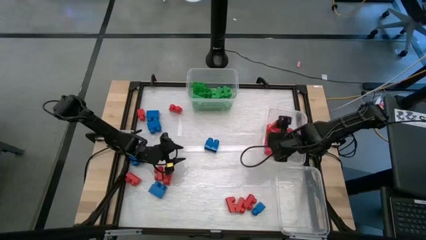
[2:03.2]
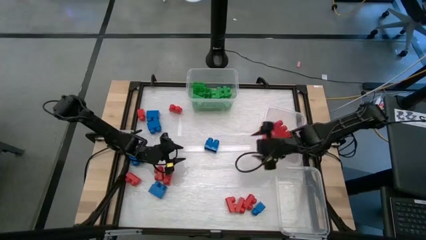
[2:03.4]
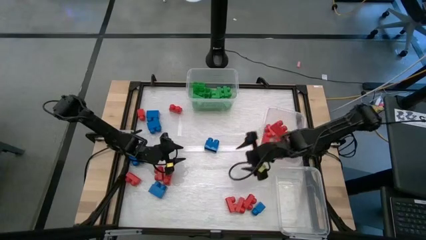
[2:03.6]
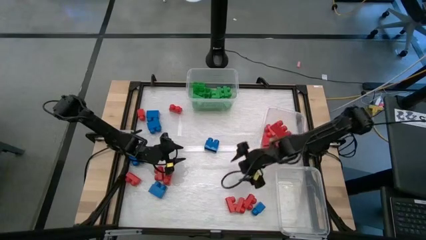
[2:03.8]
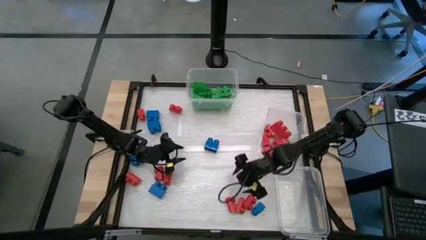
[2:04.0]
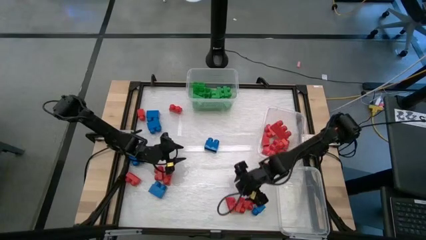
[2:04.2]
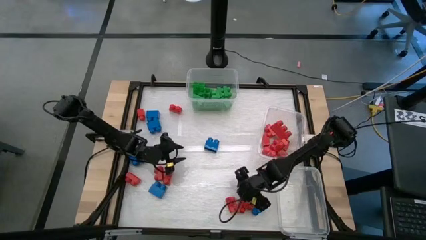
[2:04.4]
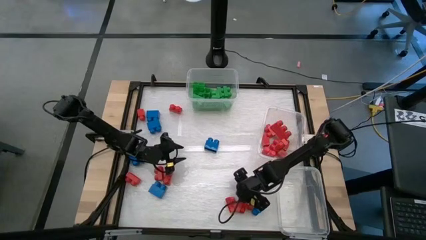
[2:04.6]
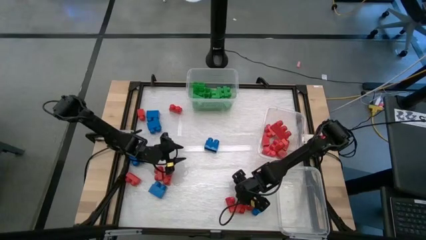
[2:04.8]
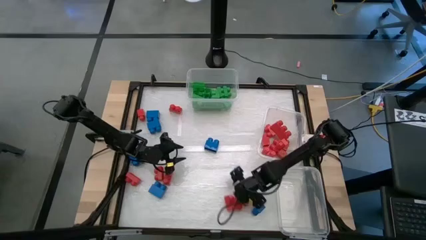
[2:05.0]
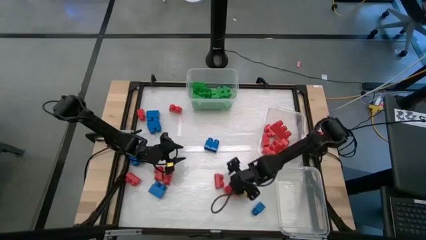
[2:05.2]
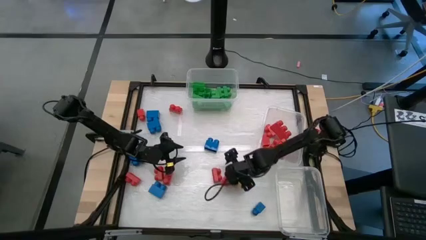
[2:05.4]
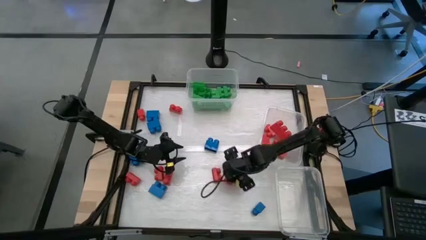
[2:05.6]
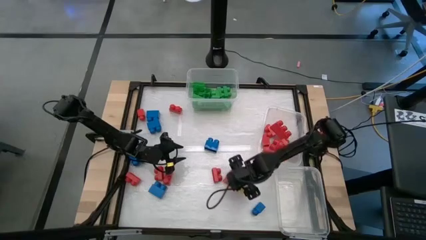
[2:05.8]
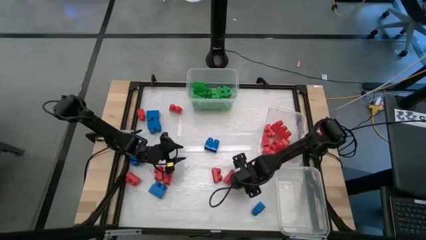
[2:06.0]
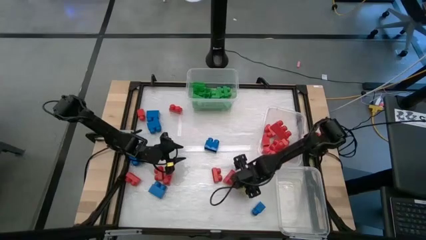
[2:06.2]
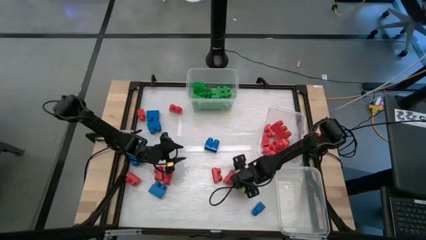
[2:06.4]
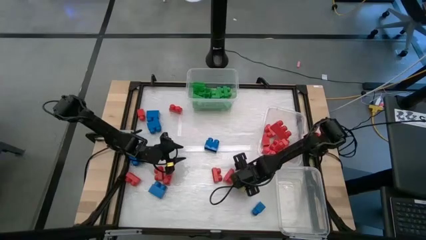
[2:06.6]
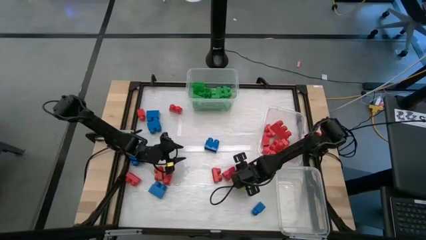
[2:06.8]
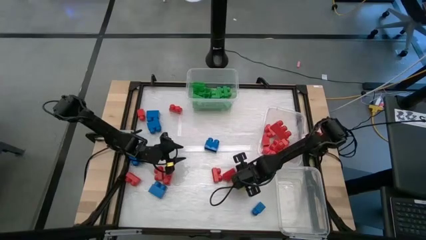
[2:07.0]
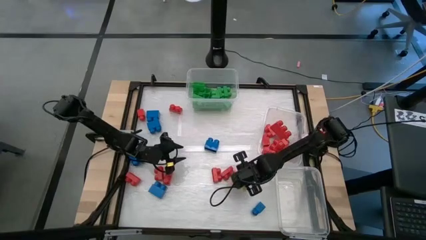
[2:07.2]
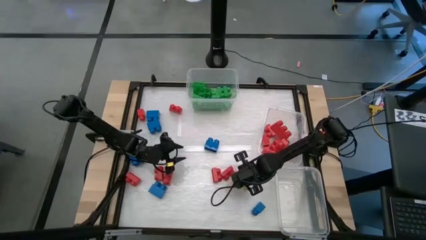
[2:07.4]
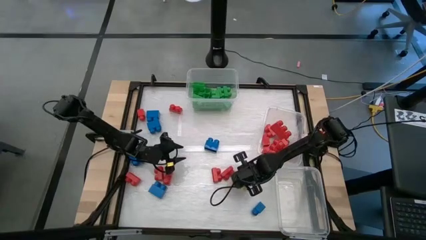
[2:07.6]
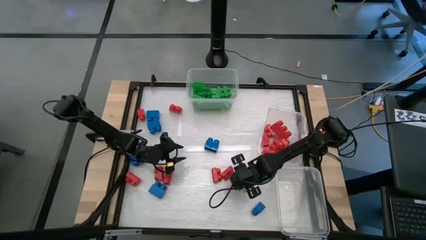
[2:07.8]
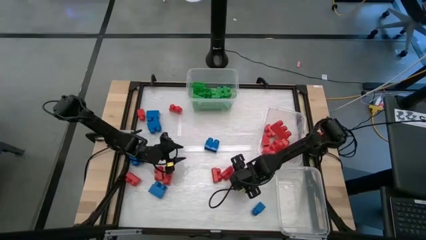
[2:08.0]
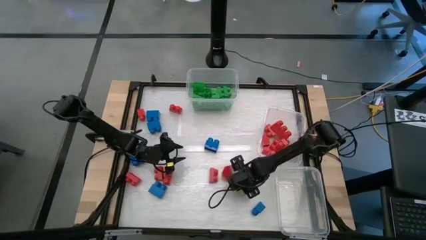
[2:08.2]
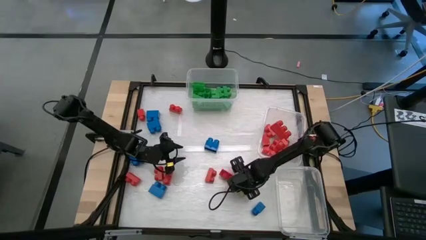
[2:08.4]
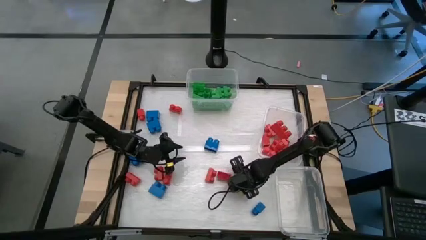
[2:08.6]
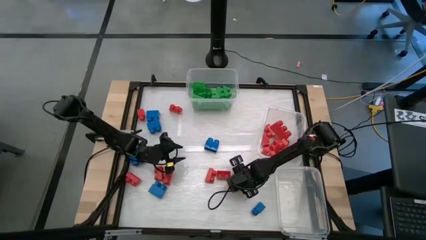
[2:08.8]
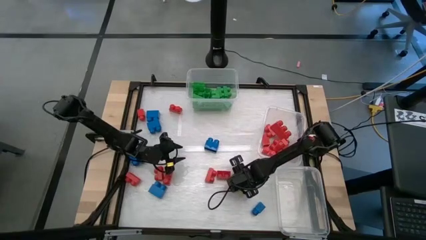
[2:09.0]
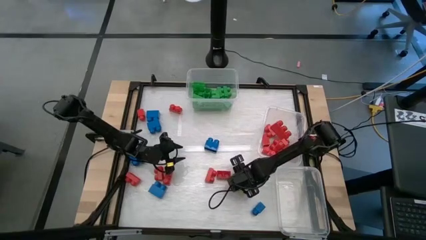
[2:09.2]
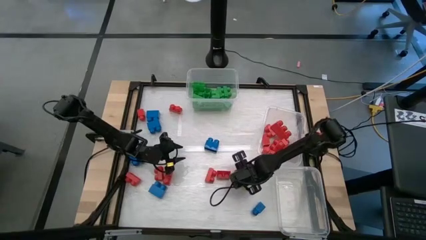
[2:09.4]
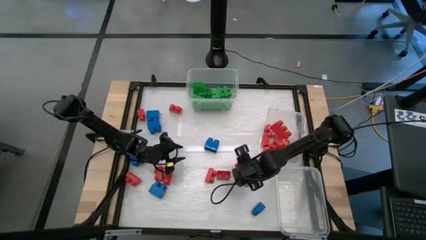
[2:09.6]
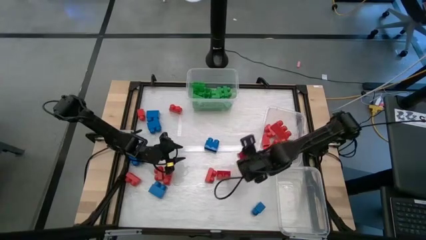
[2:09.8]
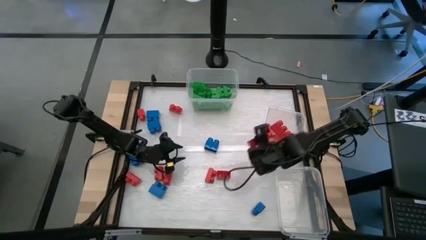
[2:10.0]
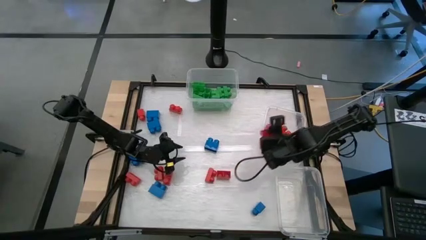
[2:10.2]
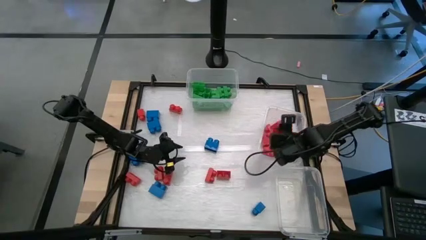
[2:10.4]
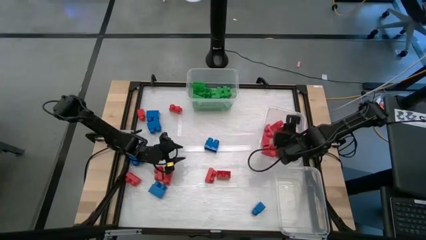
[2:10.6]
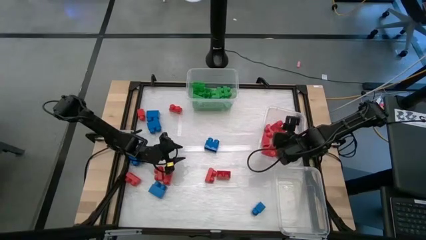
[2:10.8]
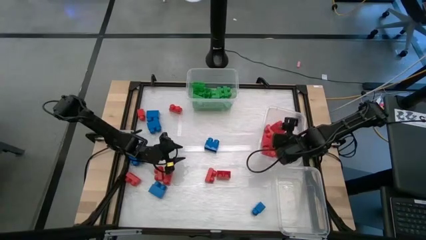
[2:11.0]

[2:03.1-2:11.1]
Task: Sort blocks
Put the red game piece into the middle right transparent bin

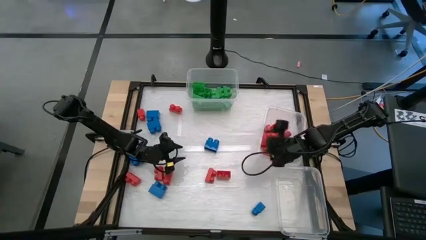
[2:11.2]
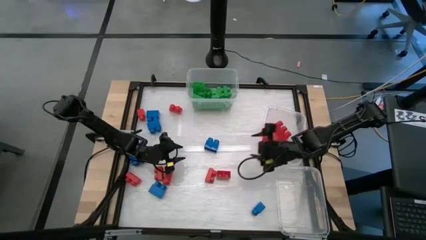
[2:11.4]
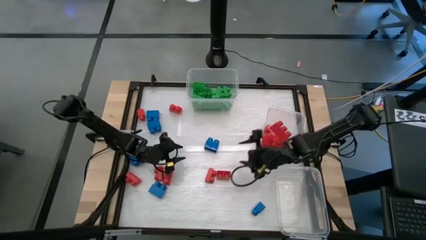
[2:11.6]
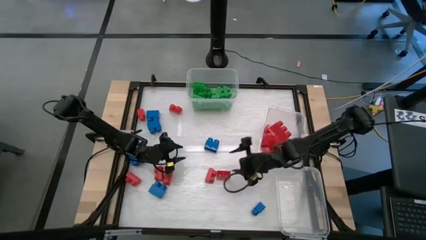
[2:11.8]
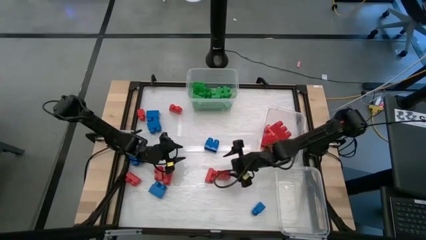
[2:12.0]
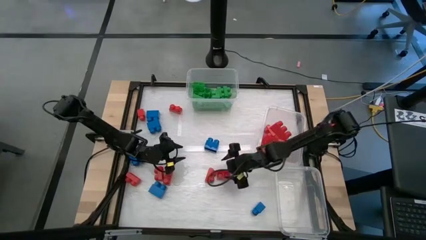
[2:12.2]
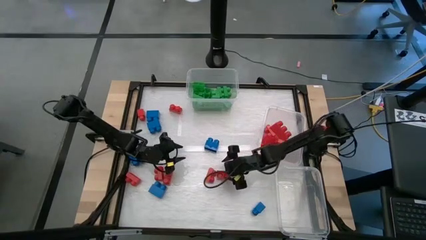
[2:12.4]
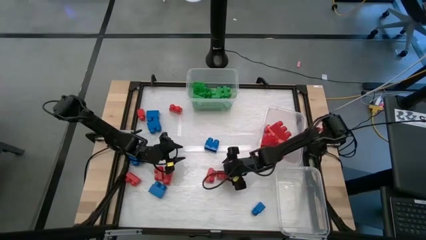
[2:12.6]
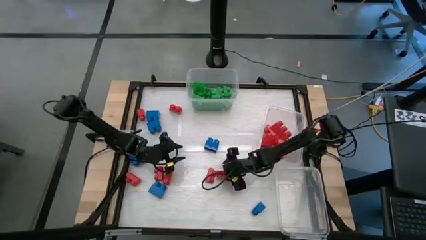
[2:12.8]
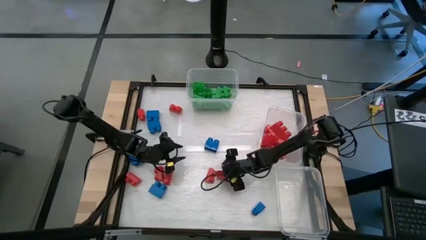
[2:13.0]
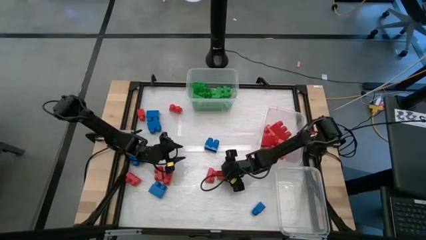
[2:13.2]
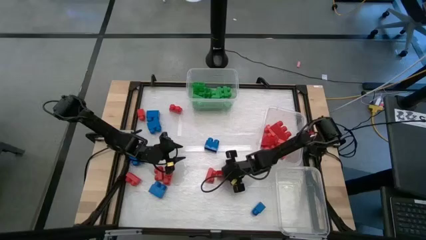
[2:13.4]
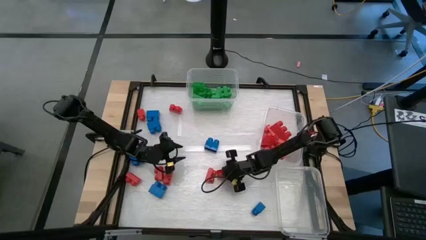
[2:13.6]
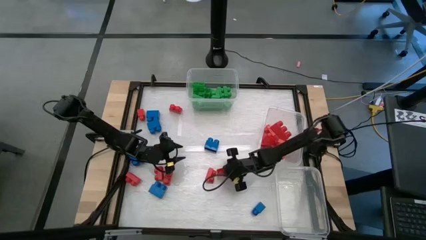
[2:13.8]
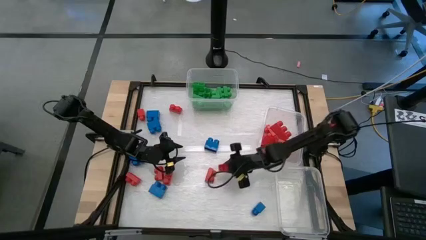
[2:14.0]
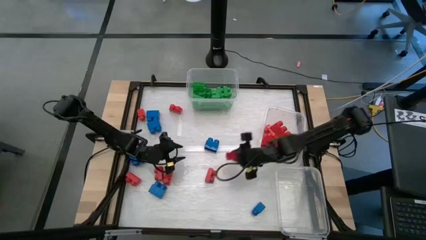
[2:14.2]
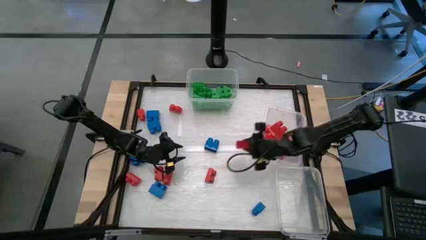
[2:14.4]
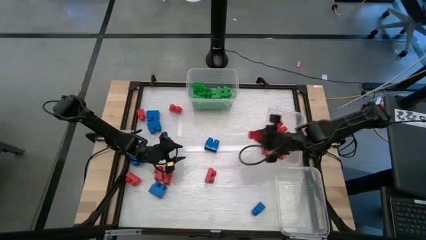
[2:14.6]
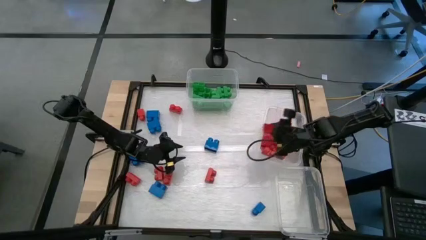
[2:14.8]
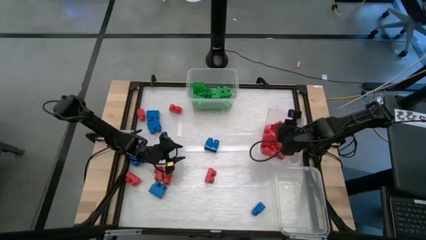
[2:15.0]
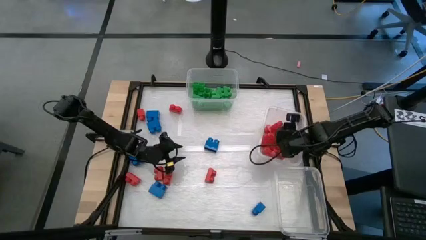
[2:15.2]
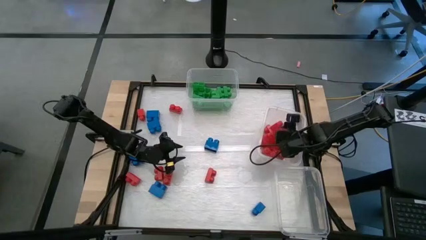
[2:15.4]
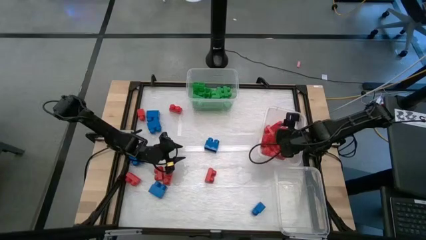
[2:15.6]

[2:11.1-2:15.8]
Put the red game piece into the middle right transparent bin

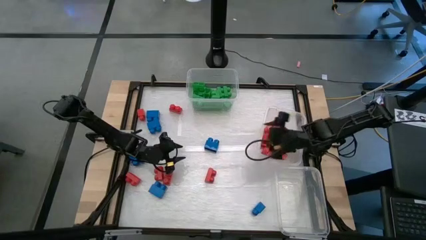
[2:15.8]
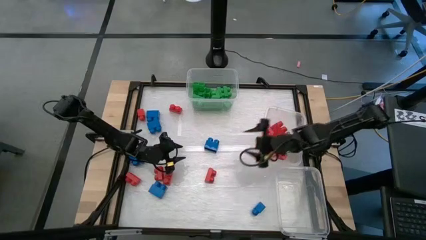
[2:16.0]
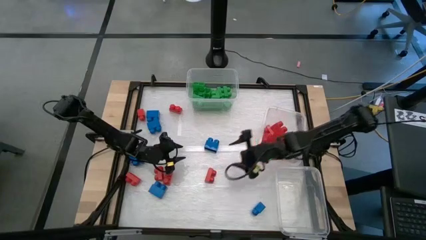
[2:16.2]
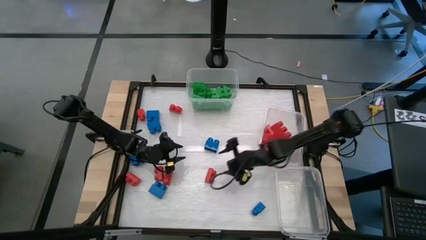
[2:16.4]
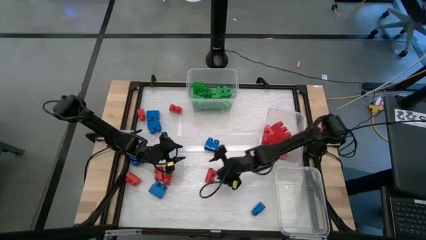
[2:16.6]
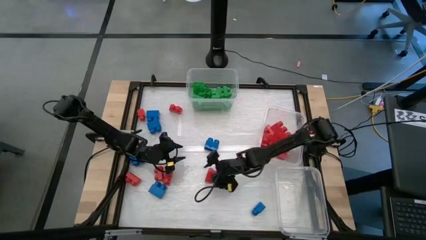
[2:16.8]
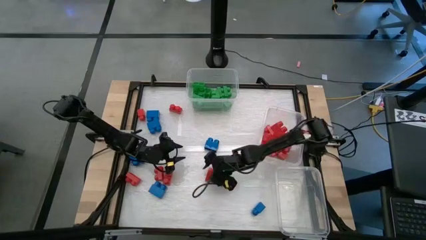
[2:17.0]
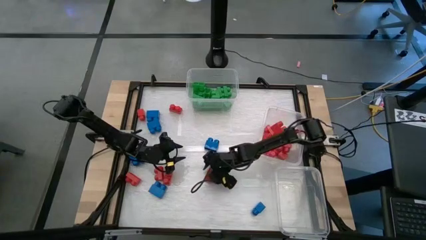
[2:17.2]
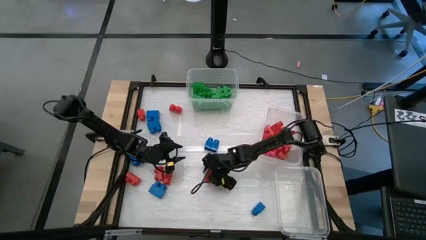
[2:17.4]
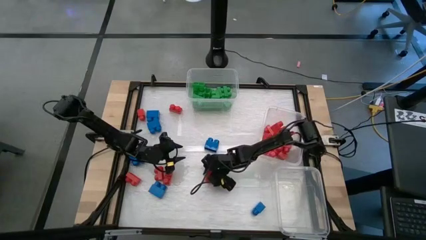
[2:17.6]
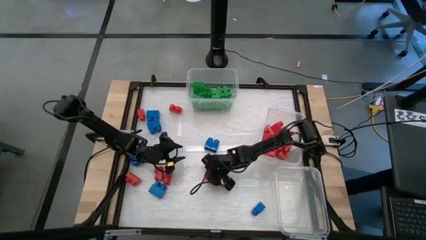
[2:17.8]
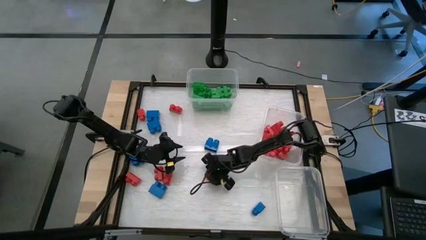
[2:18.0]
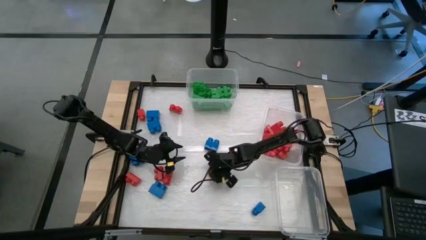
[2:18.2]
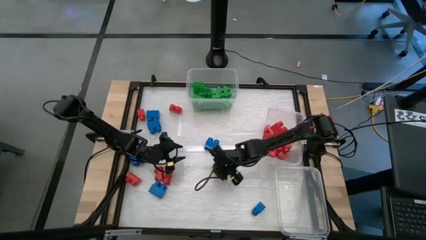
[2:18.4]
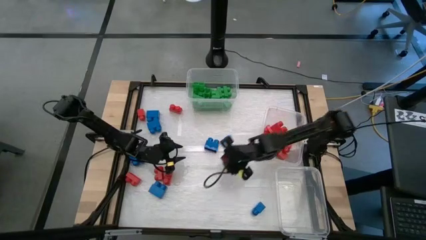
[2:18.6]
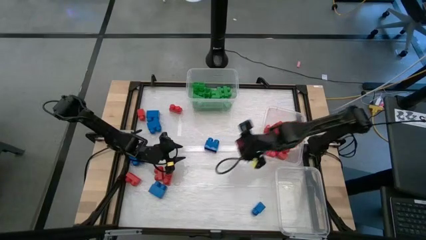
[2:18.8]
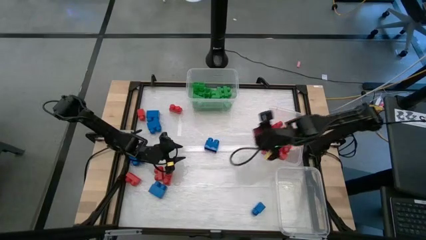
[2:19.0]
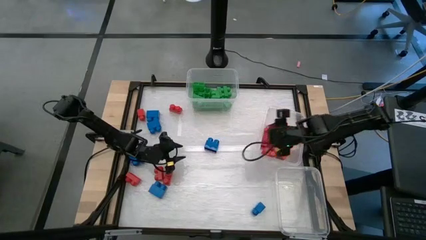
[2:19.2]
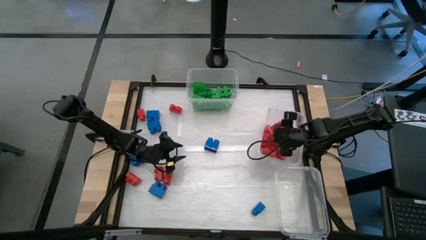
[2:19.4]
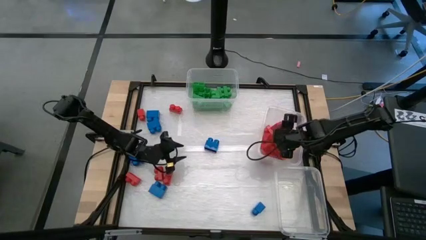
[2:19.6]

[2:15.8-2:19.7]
Put the red game piece into the middle right transparent bin

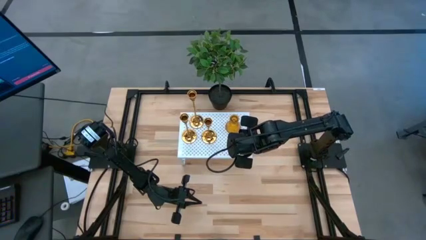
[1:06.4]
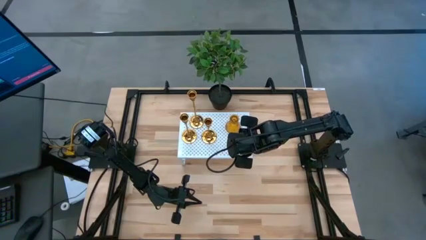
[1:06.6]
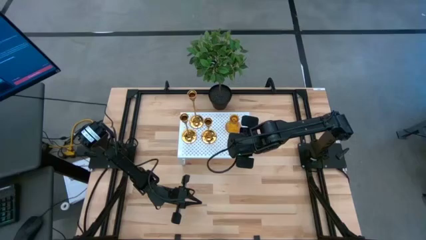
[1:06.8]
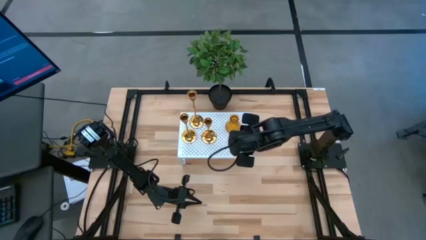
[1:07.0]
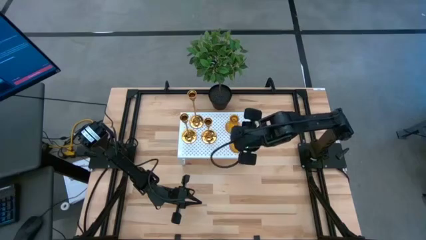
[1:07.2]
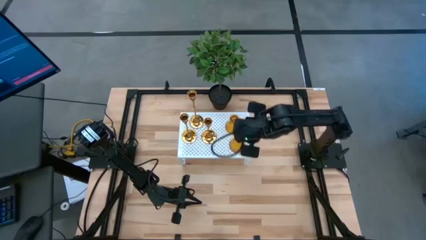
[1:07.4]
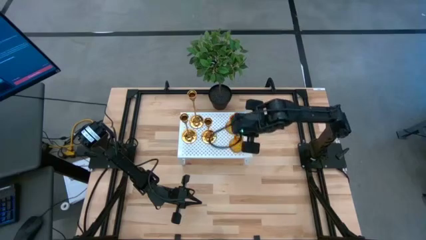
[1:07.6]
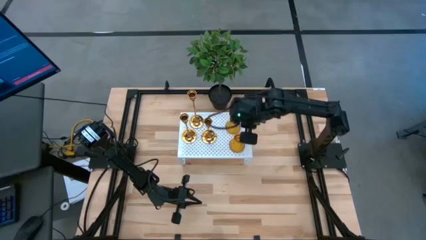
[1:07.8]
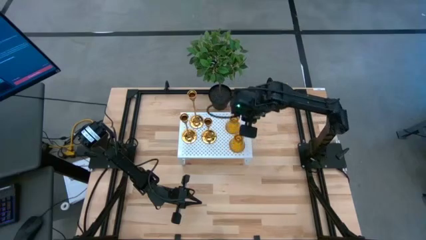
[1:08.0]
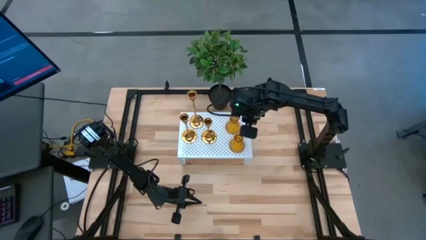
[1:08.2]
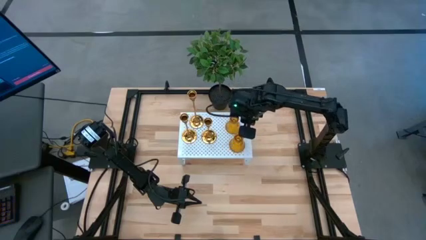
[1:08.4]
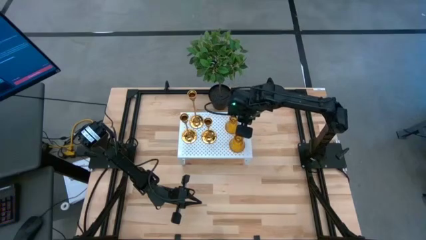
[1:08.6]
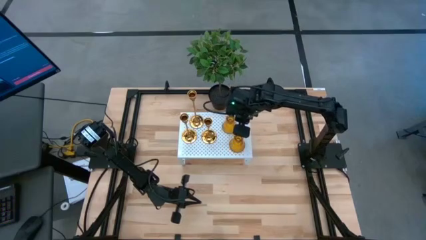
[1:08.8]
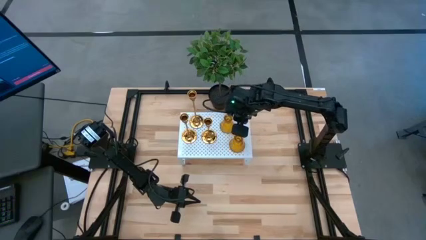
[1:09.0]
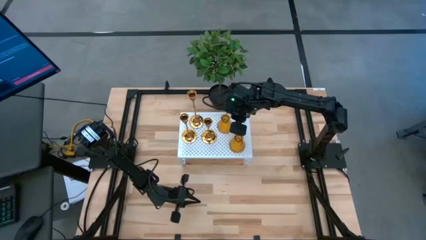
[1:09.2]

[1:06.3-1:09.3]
Task: Pick & Place candle stick holders
Adjust the top brown candle holder on the shelf
